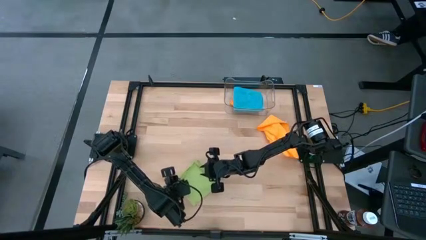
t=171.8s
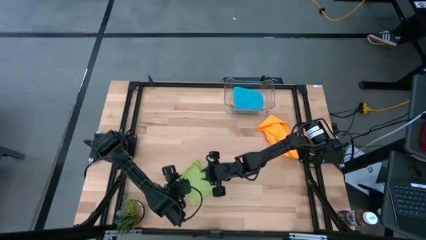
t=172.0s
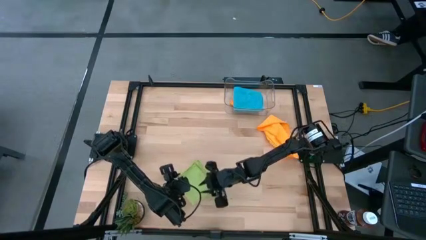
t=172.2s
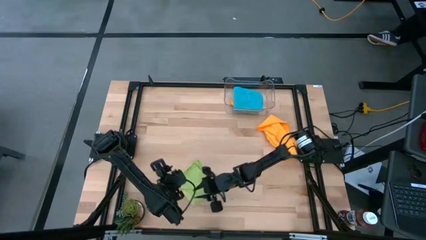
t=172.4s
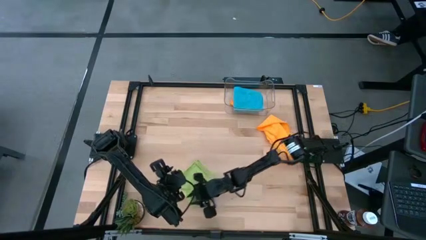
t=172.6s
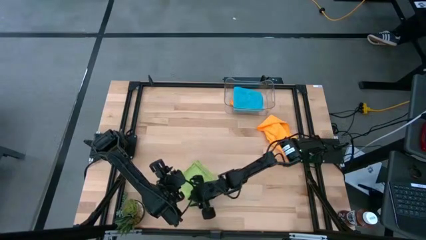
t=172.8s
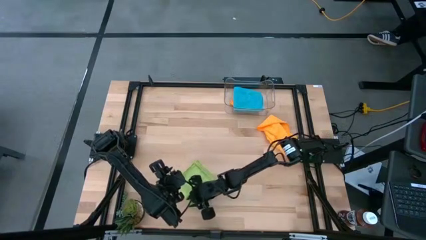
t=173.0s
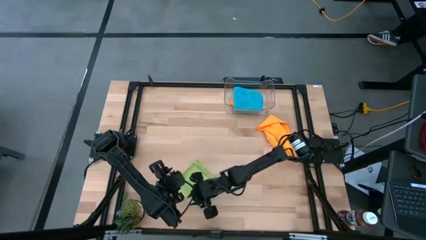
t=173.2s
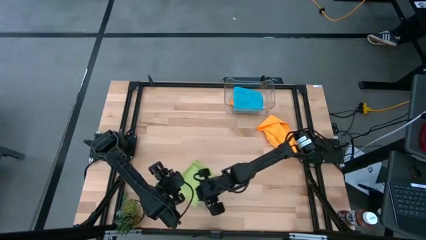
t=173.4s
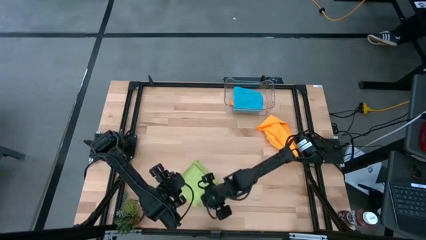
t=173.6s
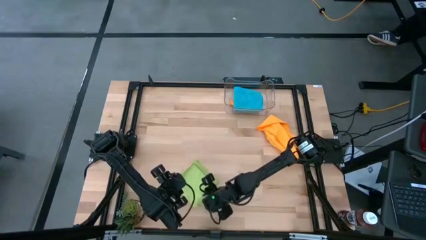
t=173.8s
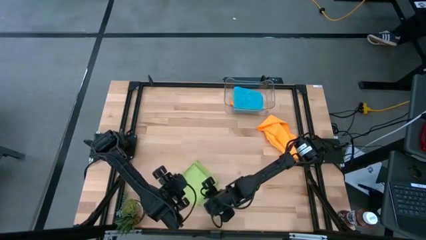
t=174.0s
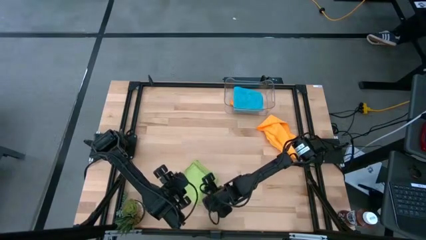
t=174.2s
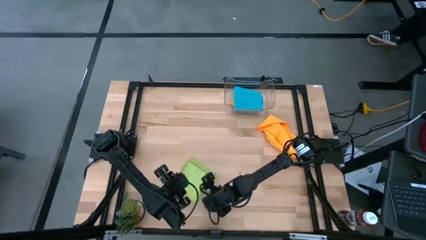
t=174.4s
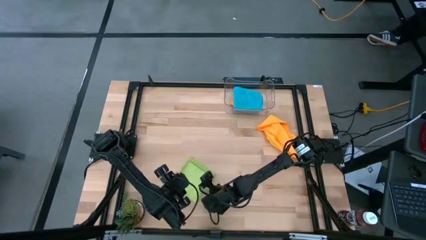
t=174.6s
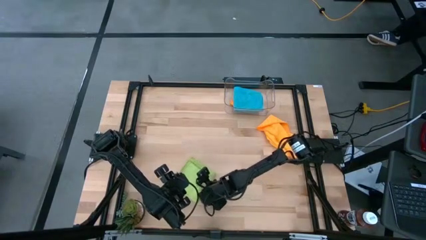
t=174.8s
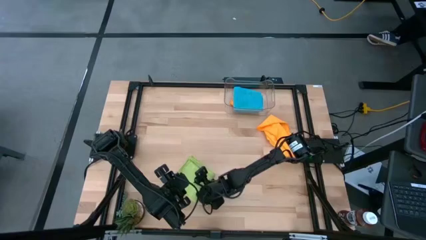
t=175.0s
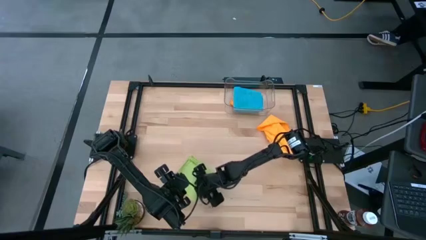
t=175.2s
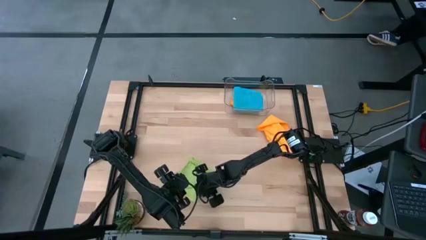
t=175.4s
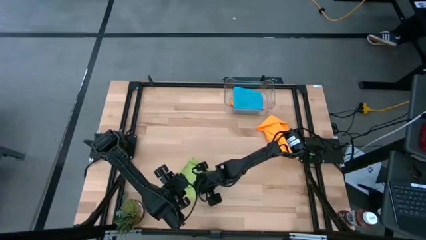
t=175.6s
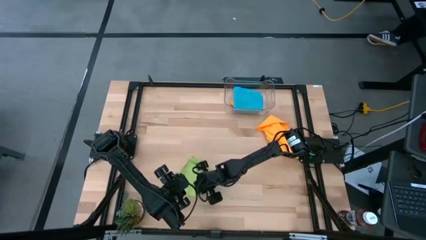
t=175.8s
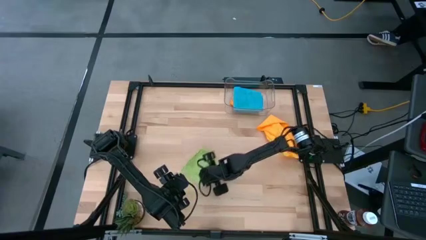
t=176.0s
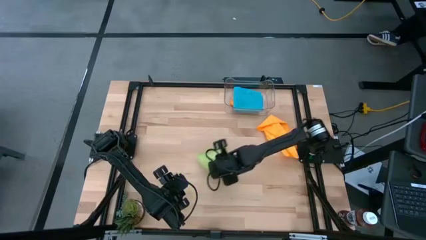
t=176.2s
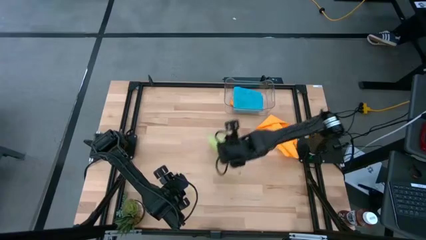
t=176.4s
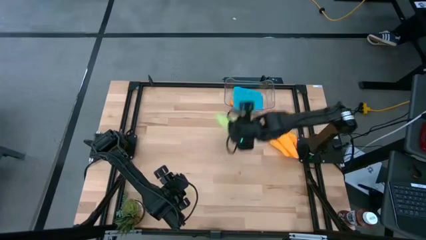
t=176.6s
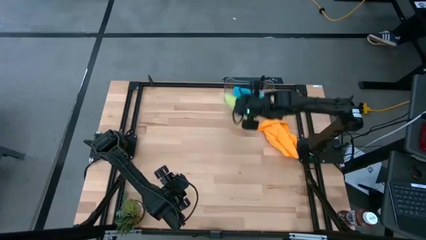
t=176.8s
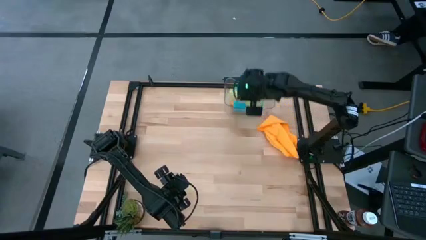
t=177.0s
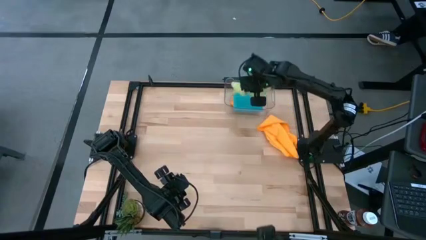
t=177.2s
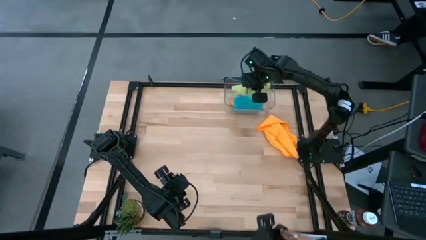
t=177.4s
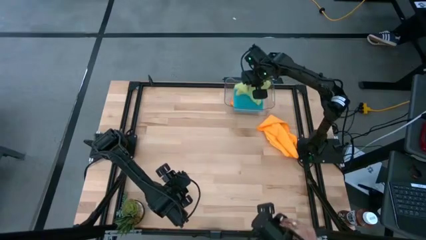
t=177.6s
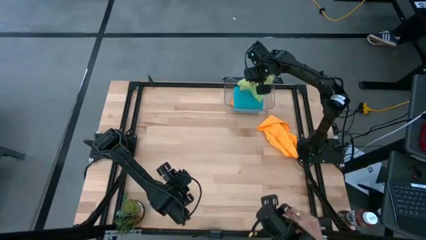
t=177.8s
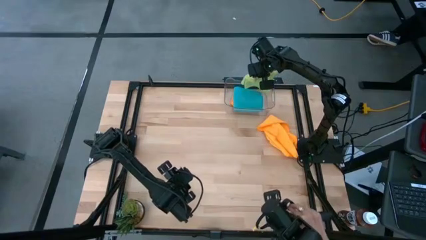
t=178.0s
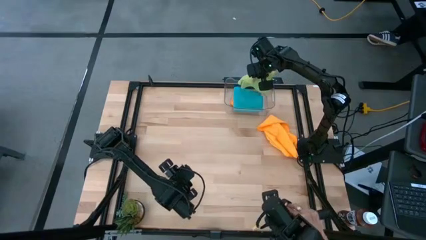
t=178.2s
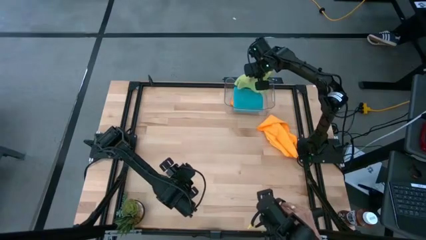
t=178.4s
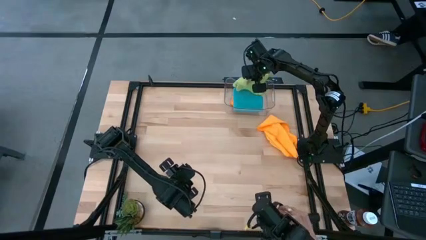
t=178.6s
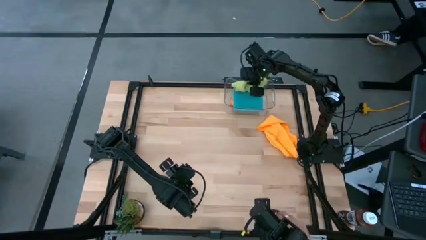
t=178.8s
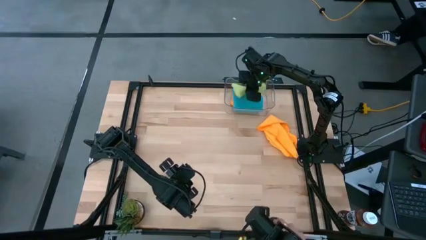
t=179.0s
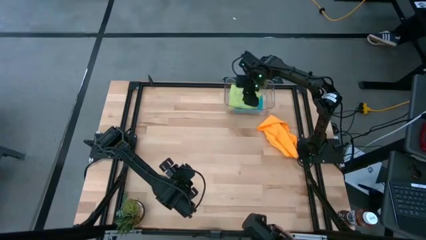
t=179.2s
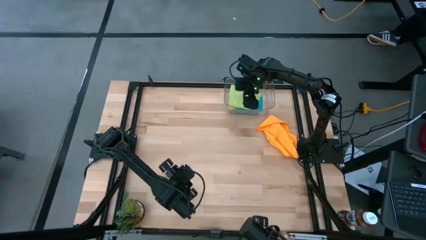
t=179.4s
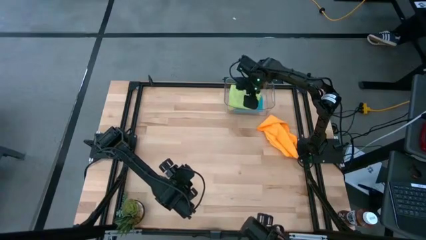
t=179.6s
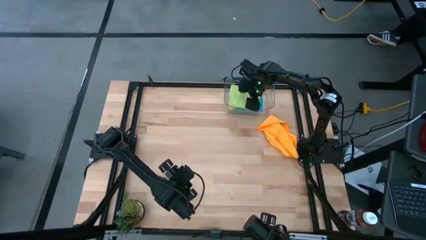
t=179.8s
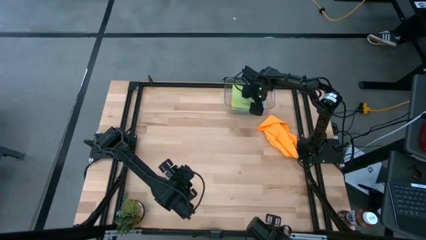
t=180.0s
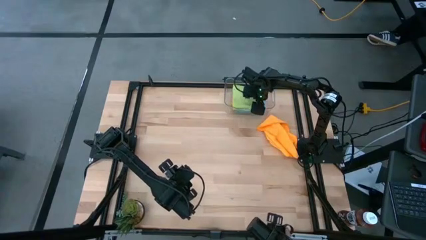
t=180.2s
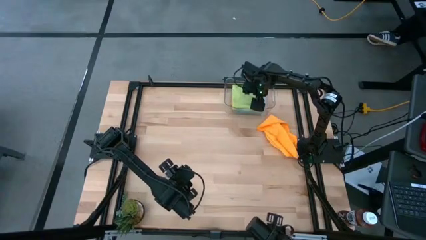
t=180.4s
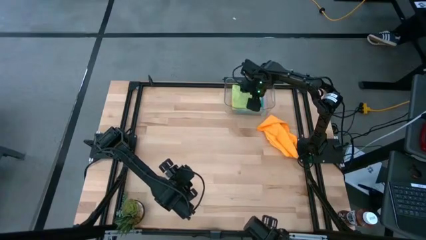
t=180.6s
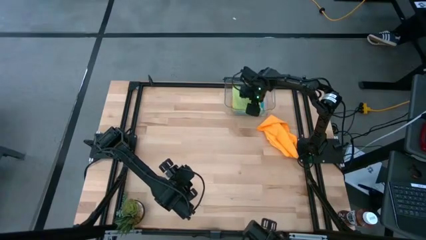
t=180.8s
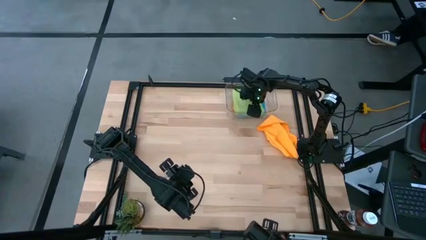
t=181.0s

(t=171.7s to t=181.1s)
Task: Fold microfiber towels
Put the green microfiber cloth into the transparent bin

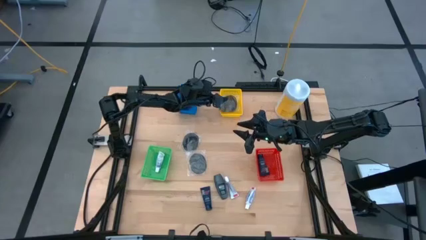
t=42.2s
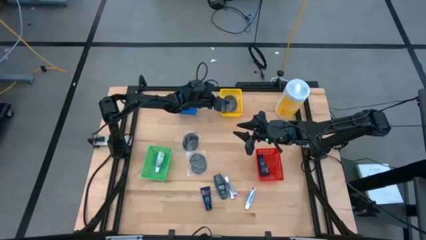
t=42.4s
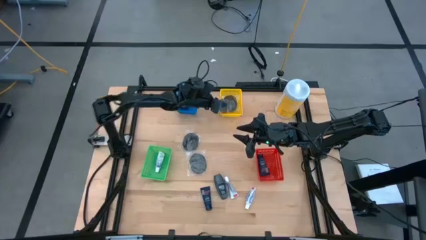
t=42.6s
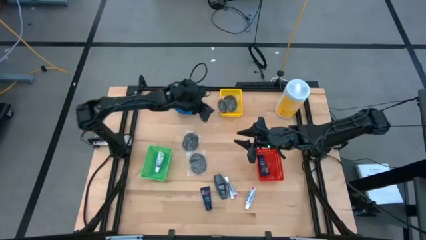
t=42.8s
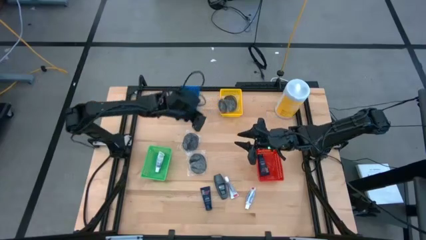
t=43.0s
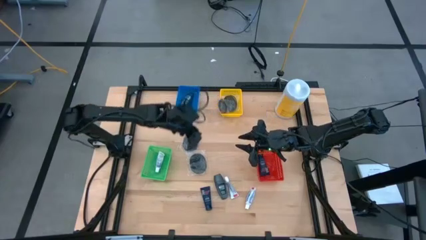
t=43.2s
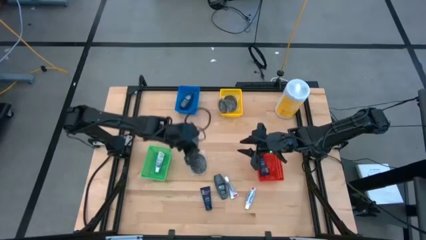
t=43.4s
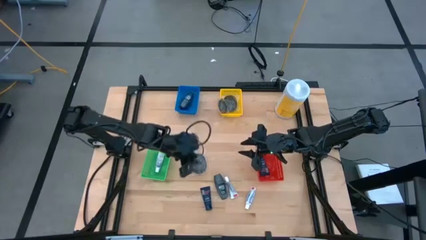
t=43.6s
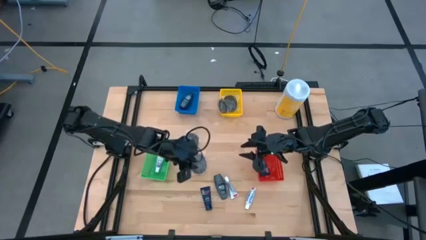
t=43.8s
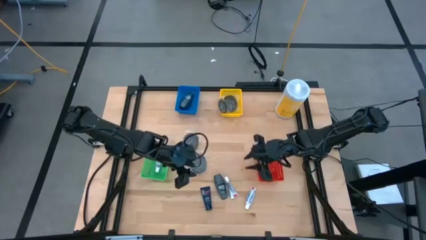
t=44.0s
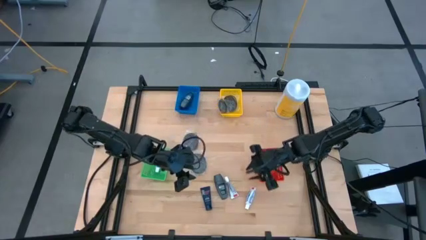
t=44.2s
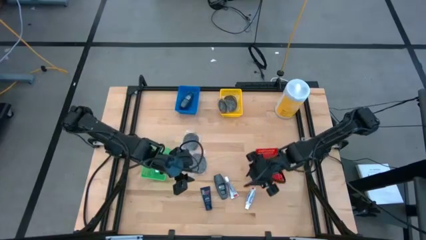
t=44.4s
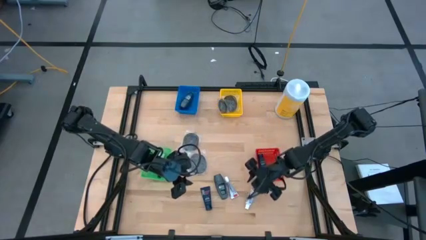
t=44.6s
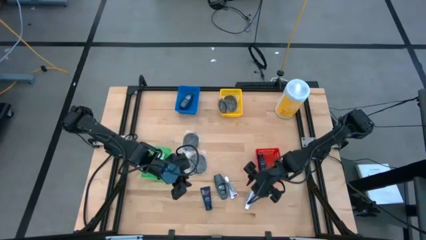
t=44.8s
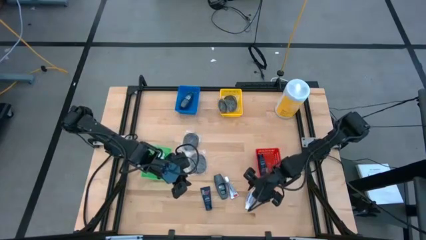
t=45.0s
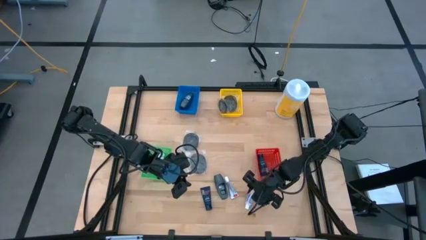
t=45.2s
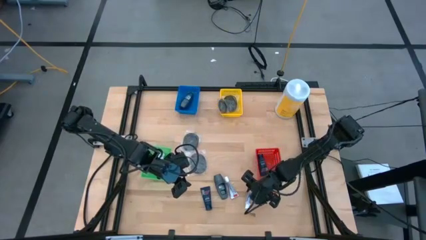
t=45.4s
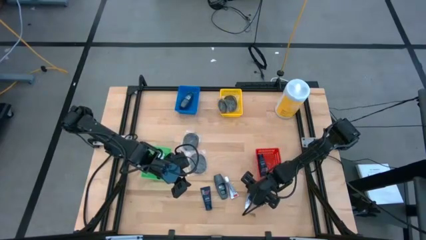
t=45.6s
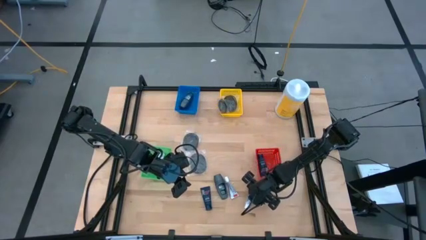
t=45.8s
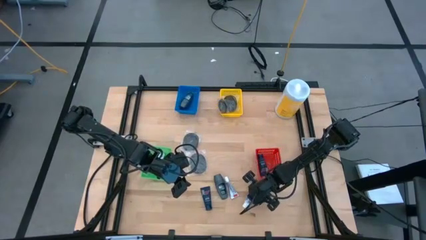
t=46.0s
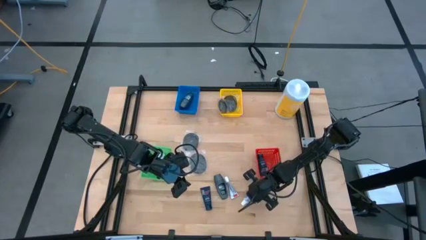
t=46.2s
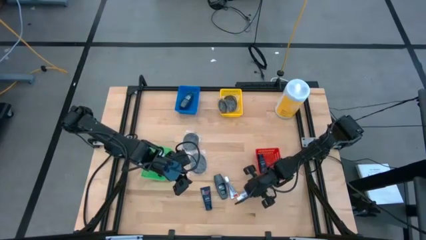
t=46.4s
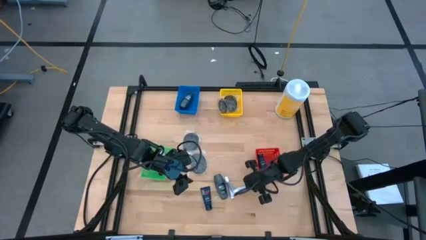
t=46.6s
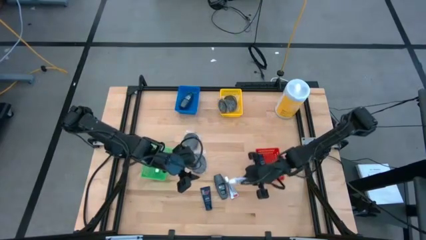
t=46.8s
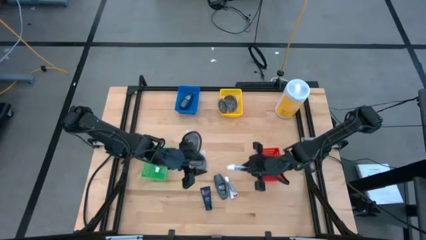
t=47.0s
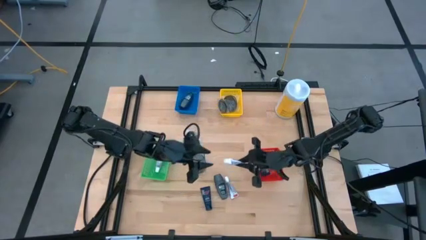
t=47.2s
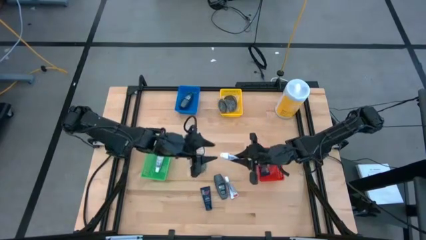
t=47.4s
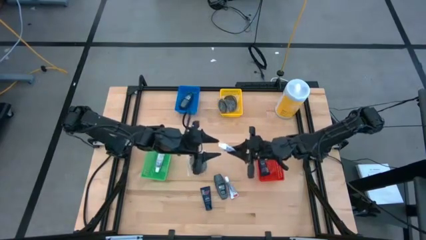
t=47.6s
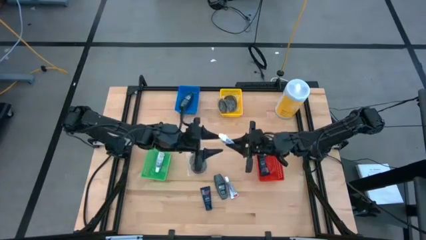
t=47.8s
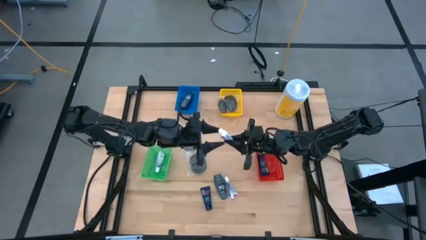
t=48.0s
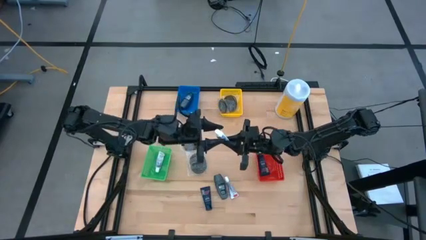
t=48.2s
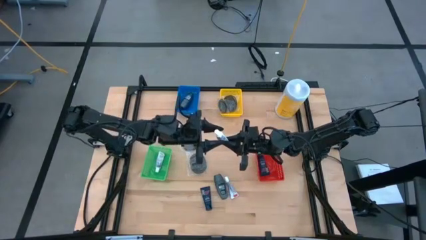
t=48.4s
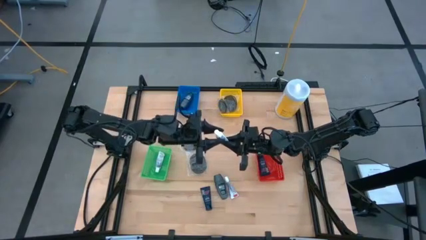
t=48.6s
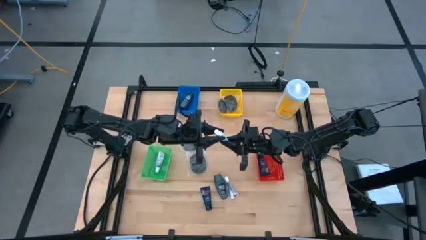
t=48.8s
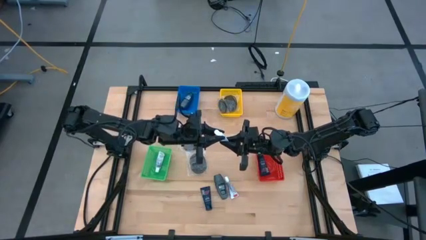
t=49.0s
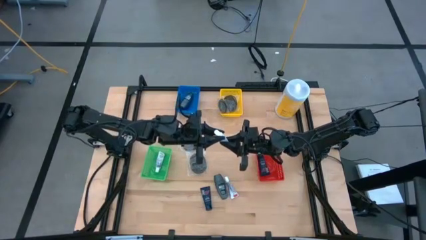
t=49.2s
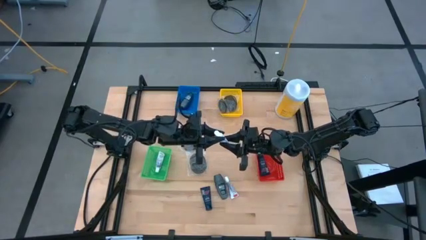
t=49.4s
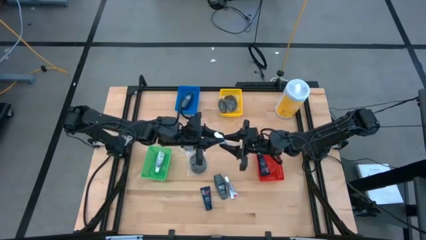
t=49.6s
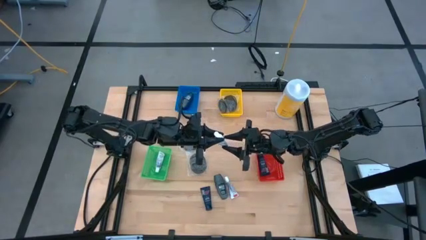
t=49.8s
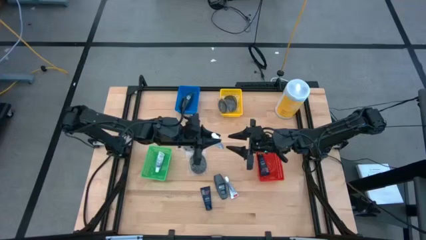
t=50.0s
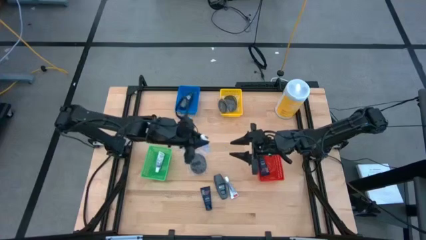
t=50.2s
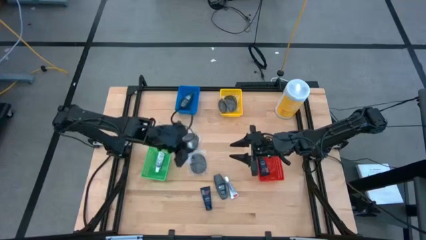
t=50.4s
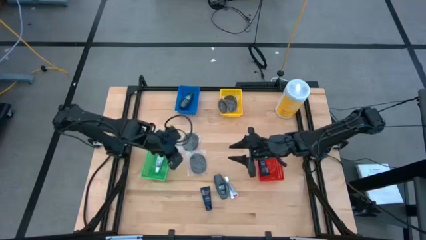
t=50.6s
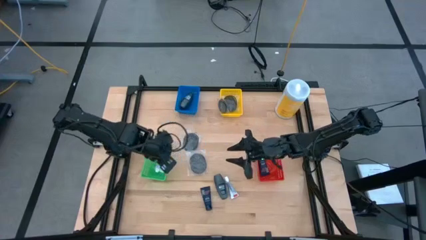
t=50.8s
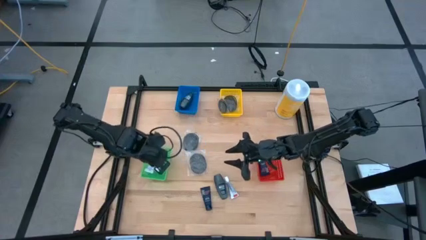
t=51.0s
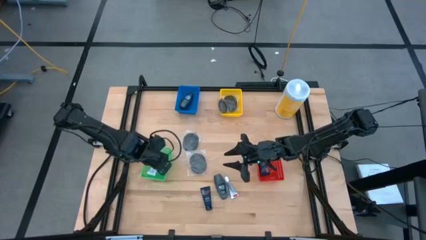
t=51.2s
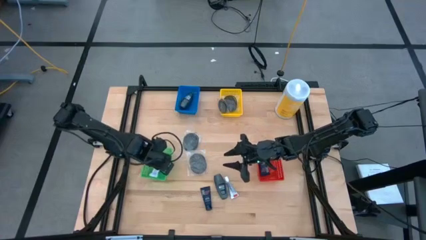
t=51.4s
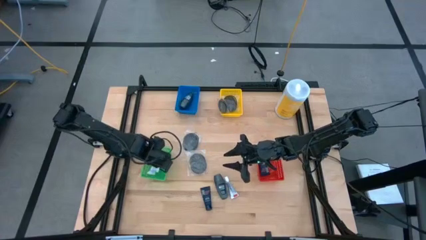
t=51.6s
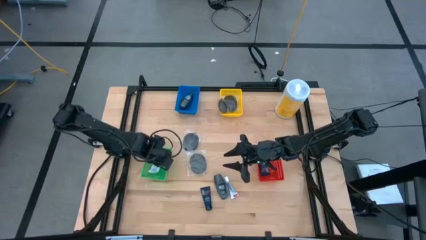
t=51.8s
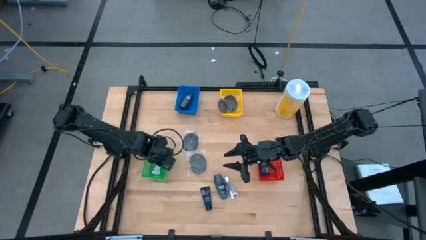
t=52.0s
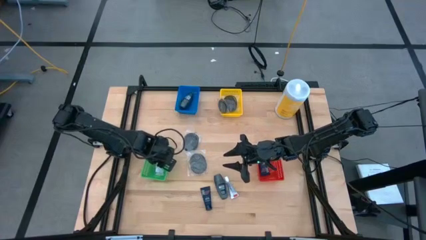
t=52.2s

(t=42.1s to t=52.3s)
Task: Pick & Place Travel size toiletries
Put the white toothpaste into the green bin
